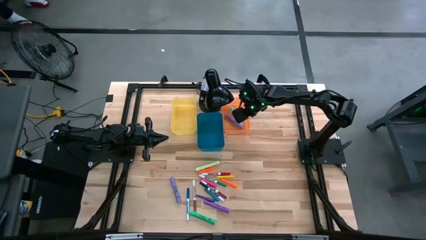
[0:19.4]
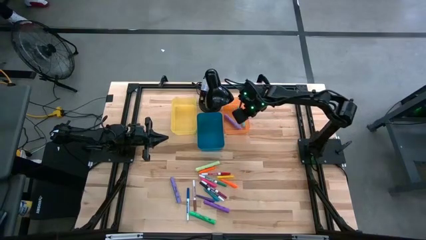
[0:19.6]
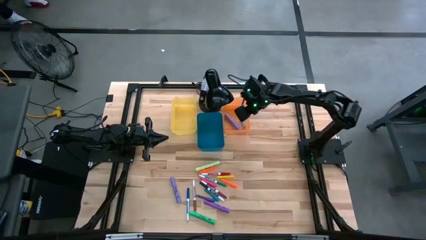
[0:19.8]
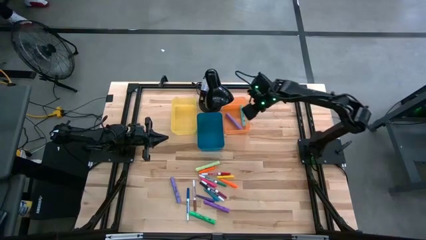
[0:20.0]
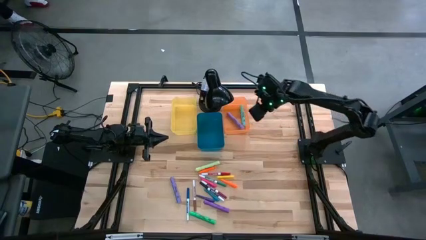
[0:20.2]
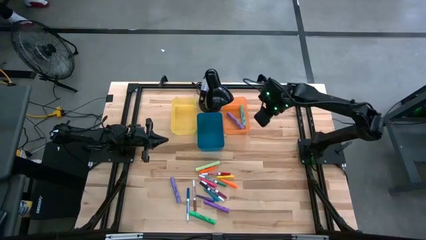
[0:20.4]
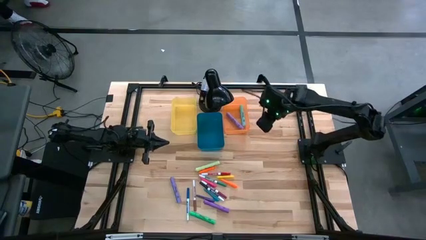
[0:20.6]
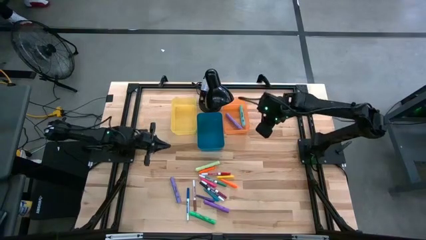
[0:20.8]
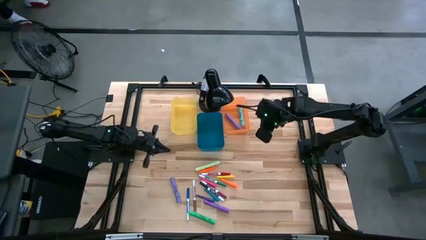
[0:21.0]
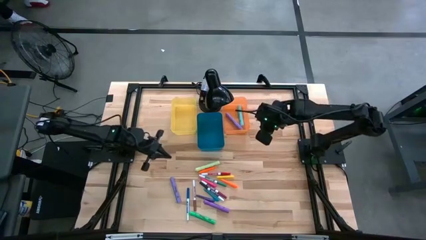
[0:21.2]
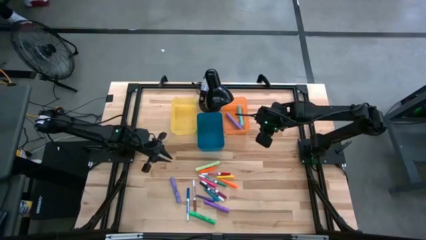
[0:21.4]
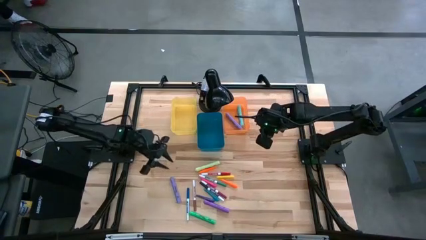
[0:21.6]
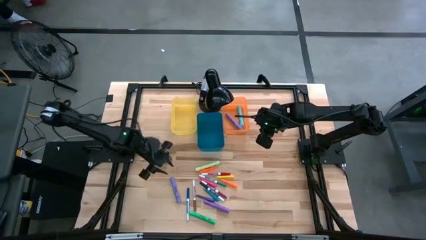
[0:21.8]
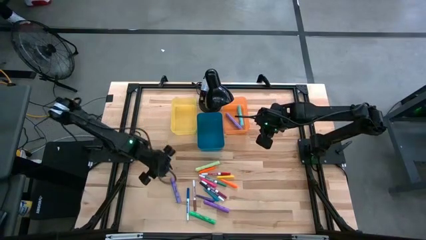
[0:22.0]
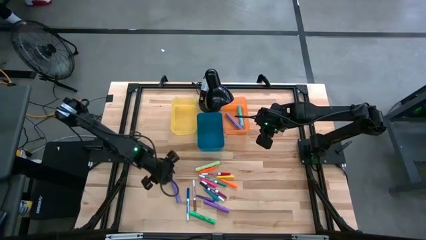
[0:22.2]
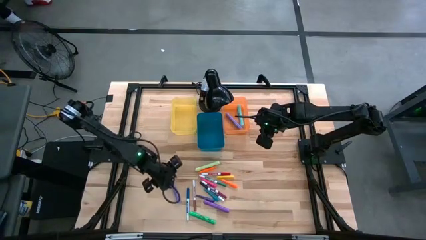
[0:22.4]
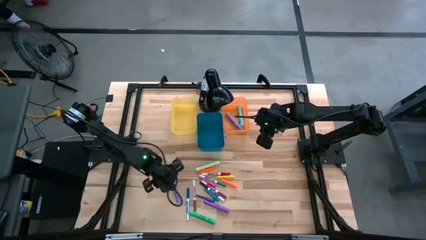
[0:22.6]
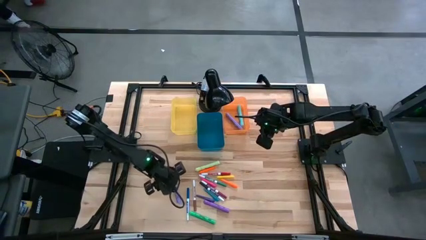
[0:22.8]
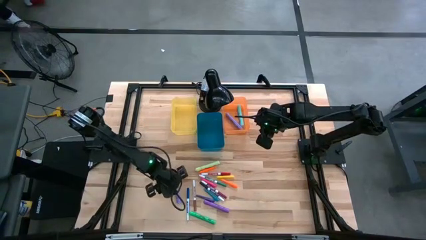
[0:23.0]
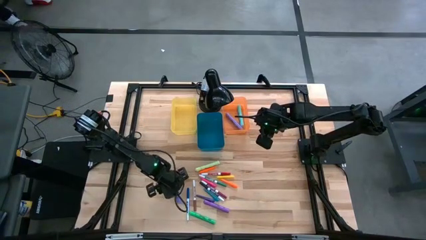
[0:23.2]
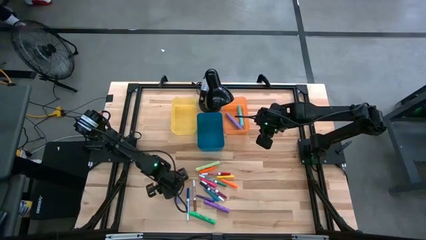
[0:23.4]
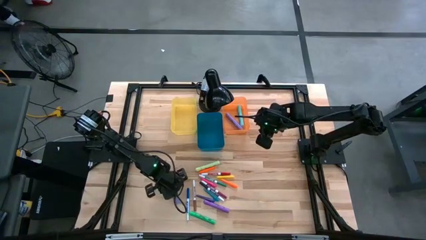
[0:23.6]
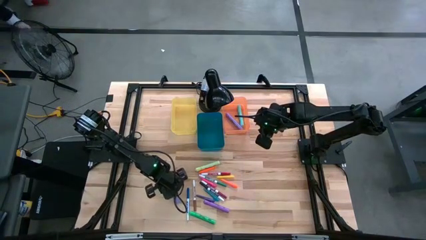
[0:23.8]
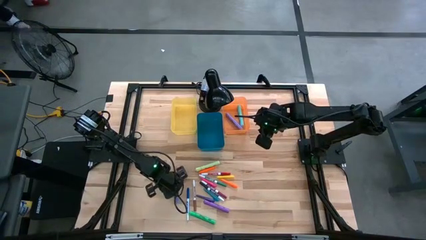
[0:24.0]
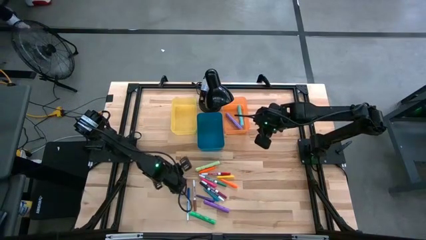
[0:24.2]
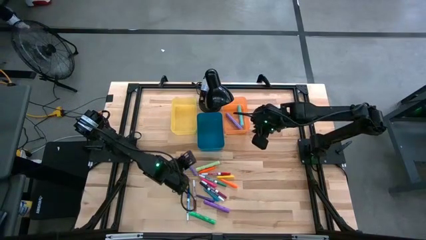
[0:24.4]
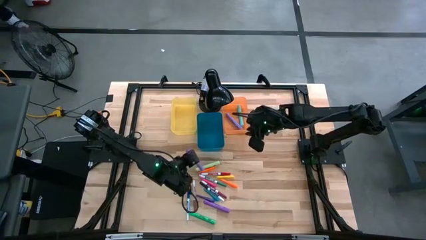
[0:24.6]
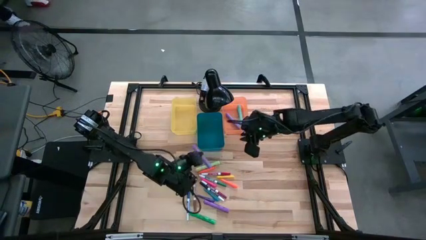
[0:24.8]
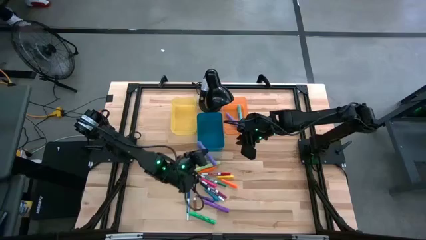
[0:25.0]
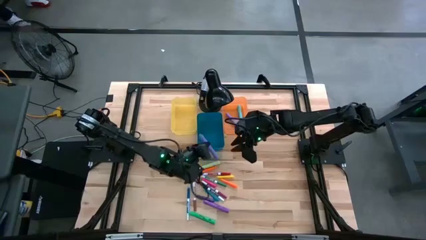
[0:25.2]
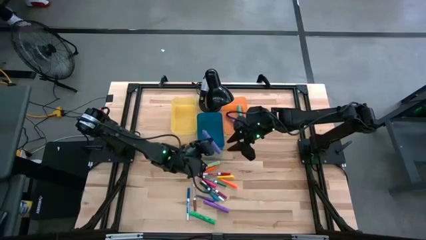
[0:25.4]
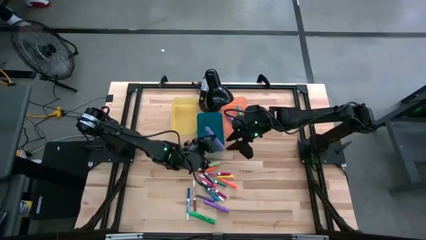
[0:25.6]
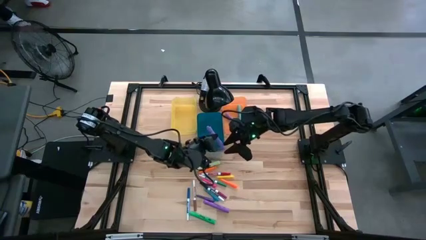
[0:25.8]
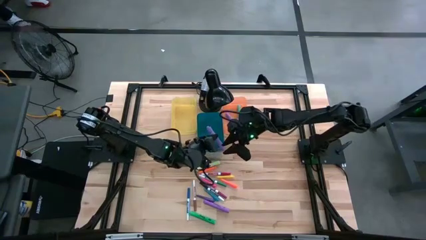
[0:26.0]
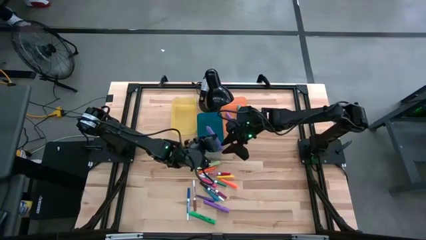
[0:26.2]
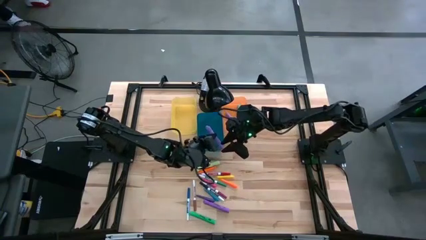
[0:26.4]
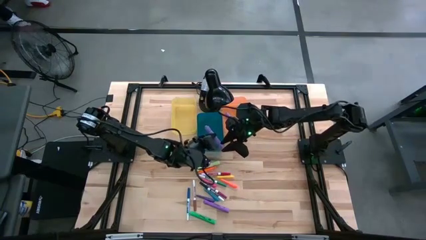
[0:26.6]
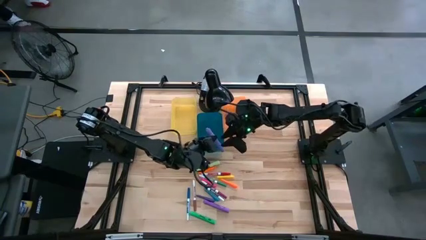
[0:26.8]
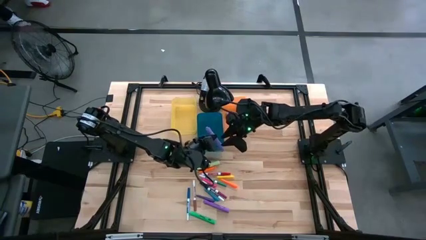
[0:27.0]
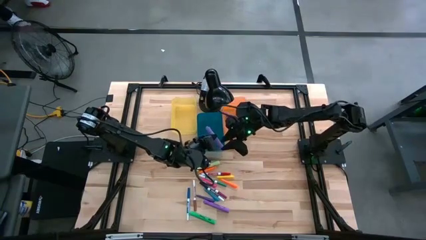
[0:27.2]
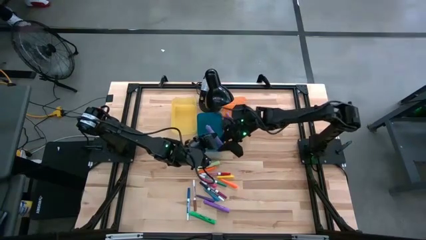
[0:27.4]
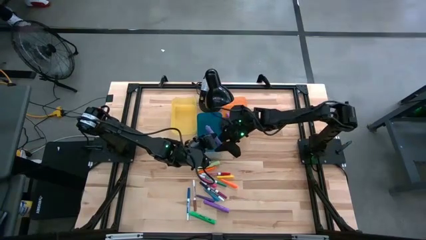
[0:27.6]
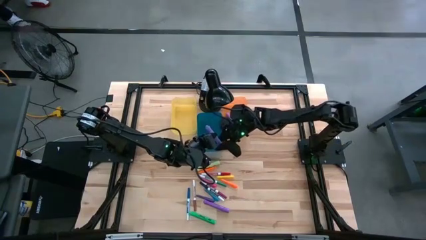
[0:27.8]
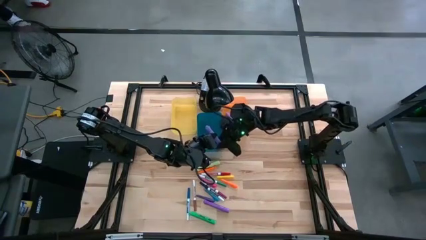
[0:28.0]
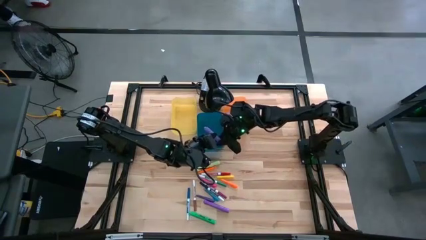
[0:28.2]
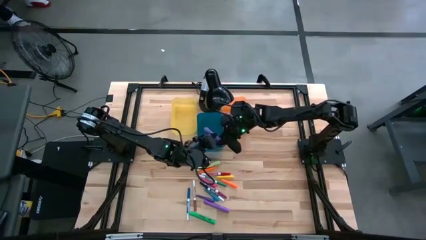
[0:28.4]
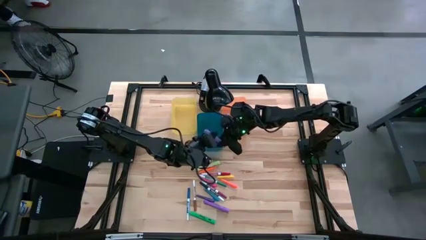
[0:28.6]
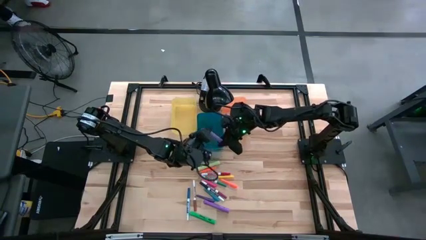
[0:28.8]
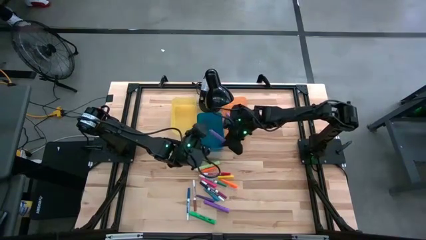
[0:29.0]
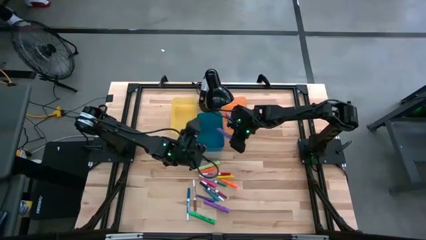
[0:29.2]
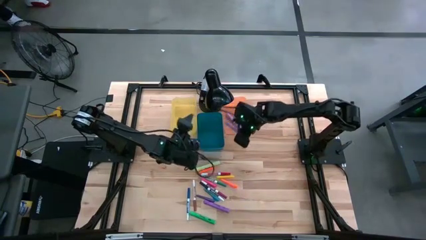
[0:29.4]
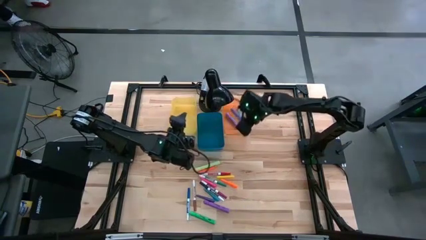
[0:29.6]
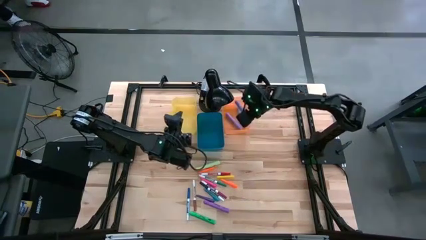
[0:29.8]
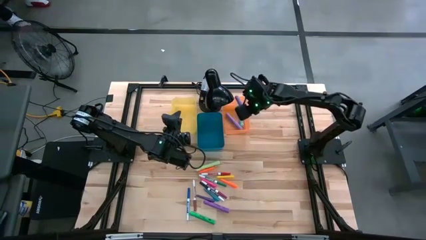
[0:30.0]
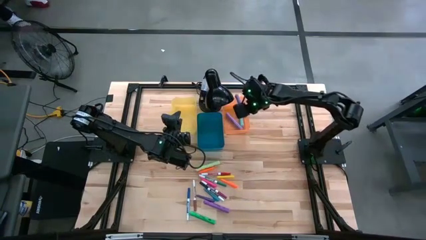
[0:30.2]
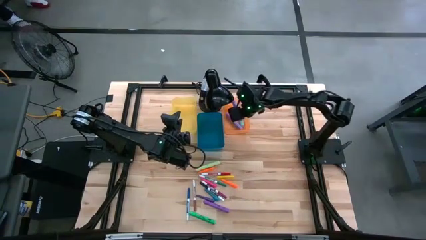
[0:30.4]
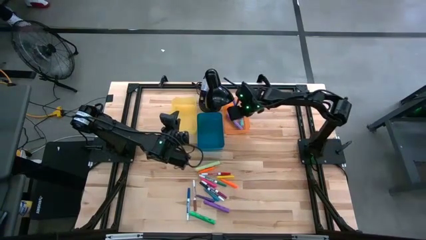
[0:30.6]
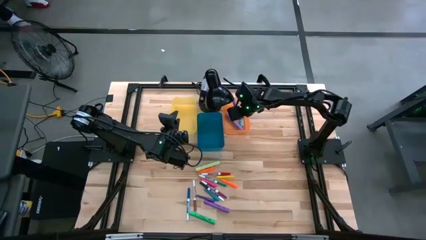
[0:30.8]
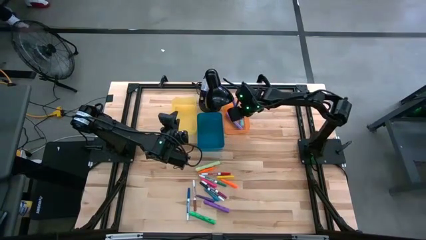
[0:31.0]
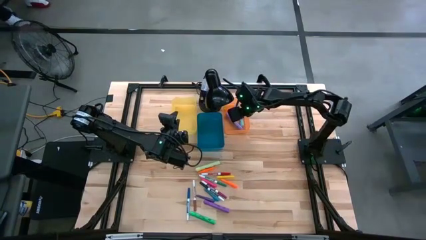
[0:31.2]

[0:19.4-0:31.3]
Task: Pick & Place Markers
Put the violet highlighter into the orange bin

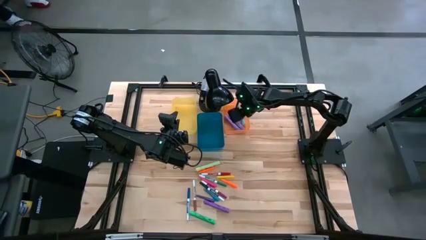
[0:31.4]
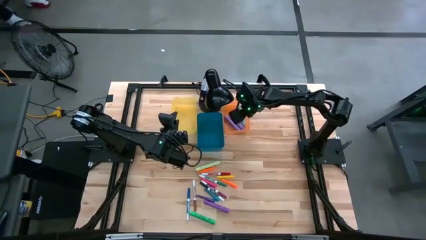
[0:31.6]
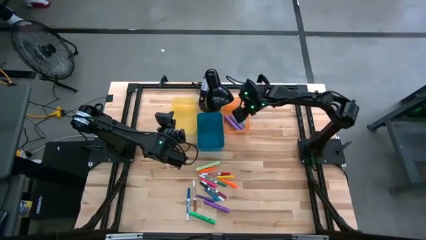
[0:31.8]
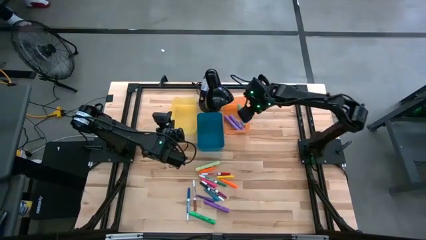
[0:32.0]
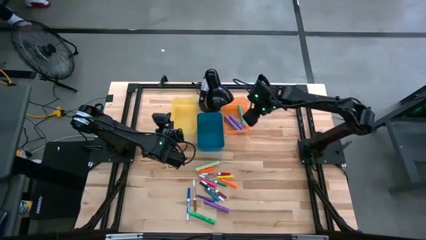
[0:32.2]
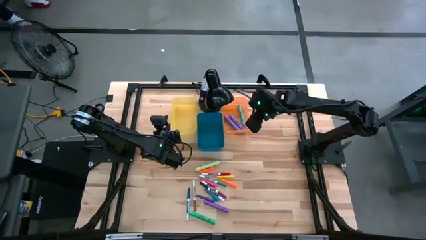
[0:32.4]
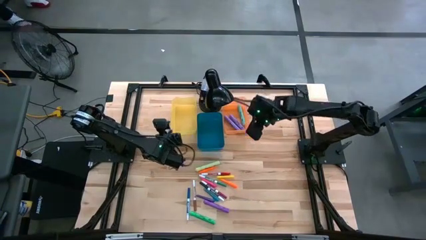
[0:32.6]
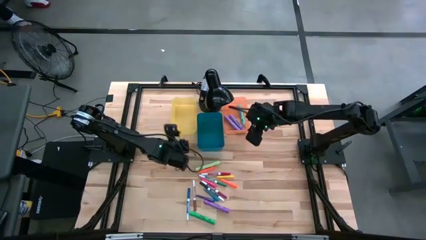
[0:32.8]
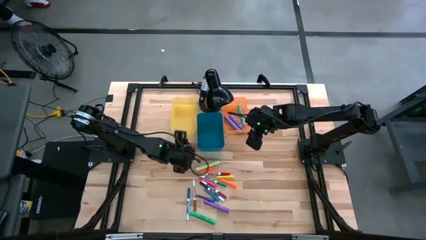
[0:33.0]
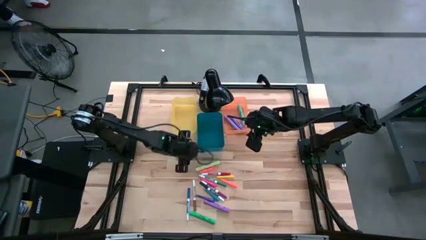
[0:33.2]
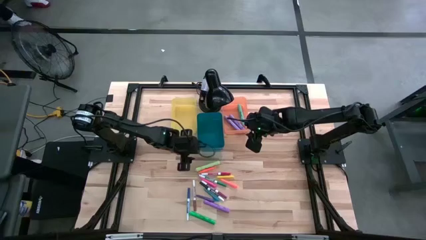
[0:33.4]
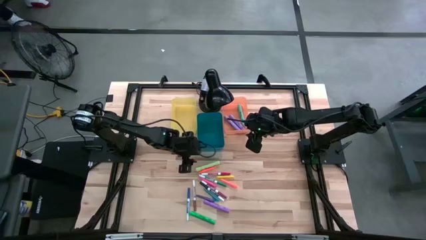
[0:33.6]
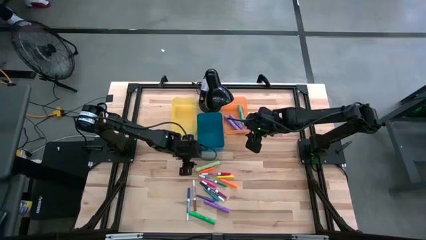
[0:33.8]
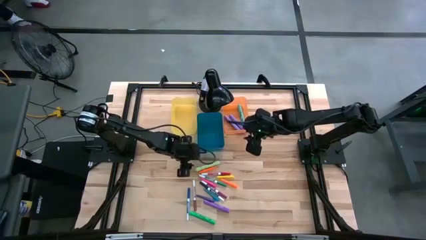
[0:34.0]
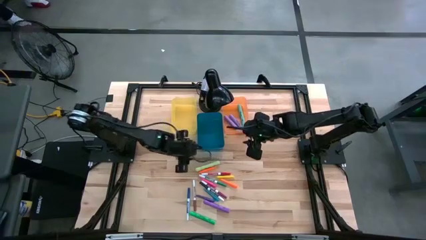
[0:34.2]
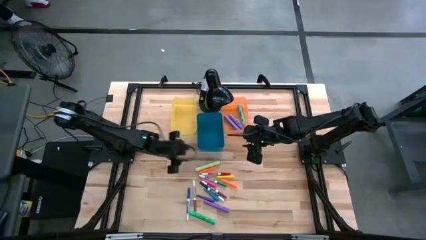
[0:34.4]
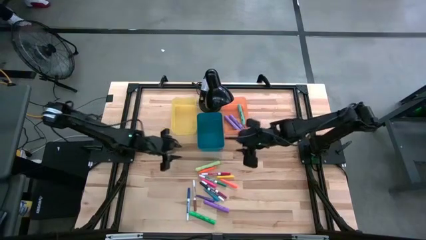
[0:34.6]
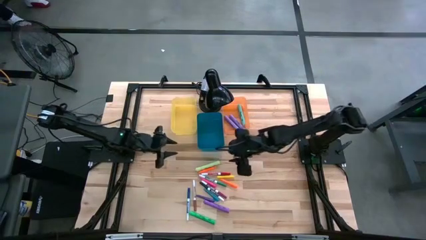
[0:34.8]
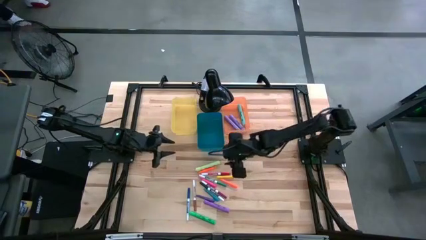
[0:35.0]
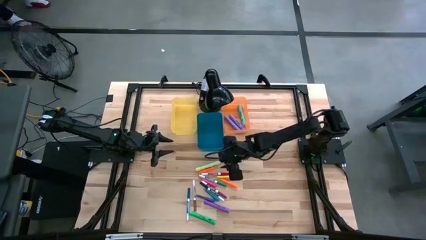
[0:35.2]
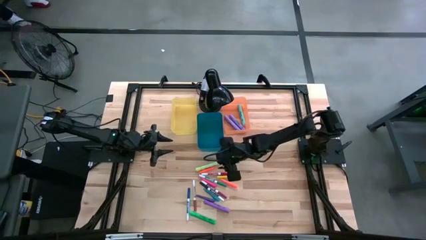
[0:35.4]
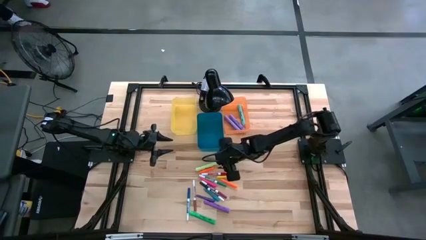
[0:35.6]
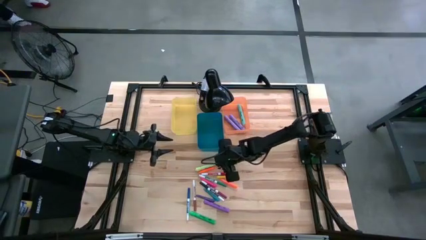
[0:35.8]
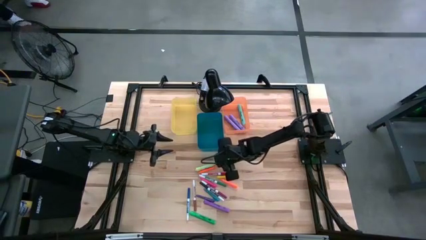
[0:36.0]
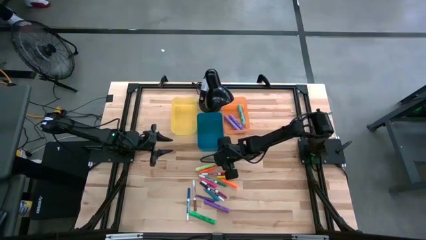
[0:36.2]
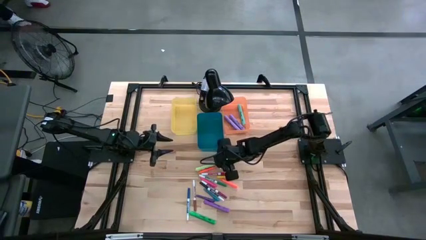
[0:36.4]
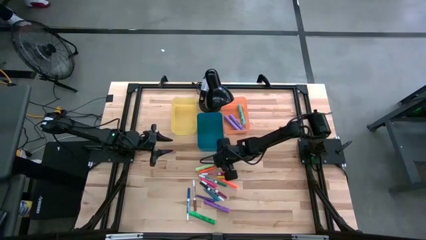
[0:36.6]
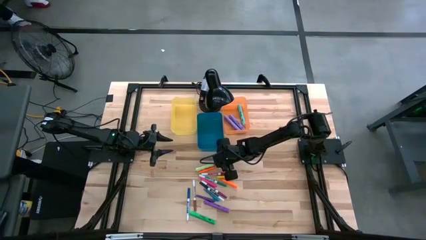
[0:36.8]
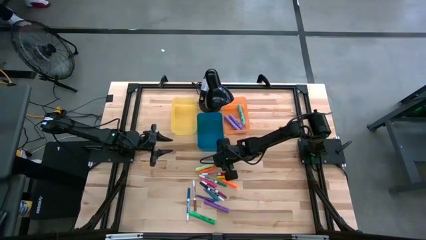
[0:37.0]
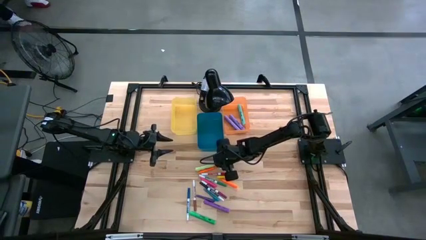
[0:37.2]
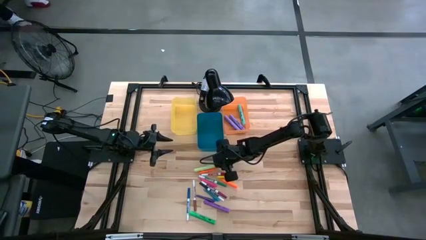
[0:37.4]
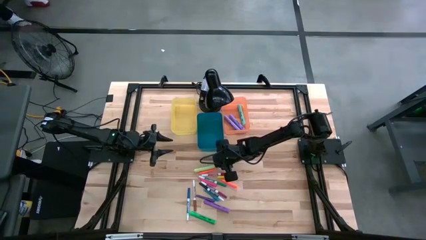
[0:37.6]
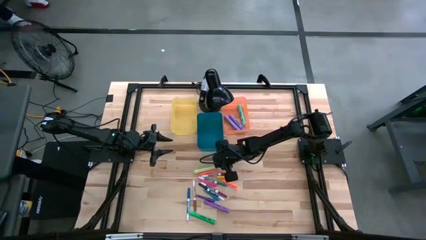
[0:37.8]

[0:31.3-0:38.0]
Put the light green highlighter into the orange bin
